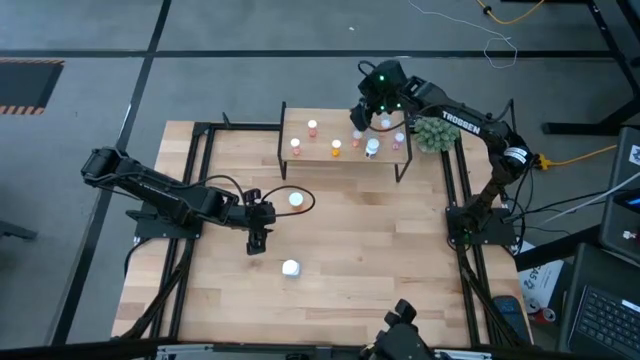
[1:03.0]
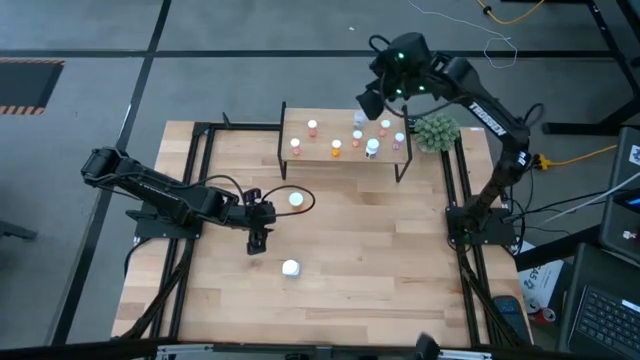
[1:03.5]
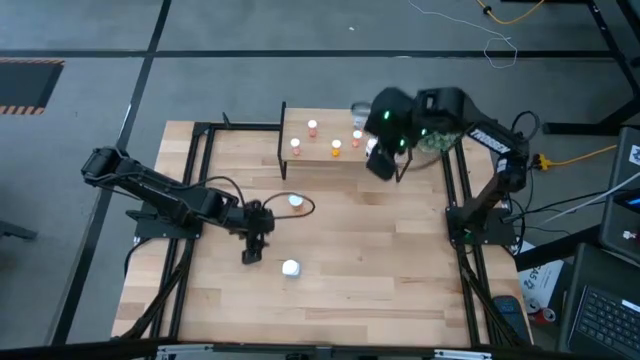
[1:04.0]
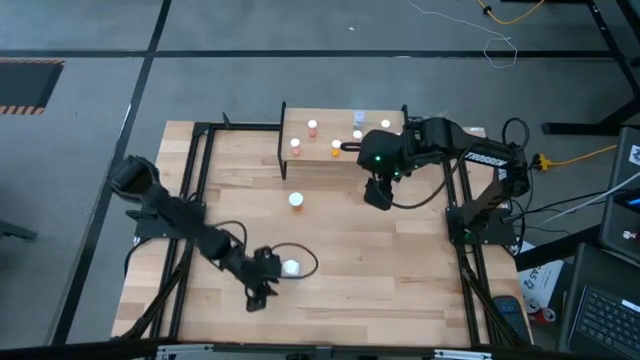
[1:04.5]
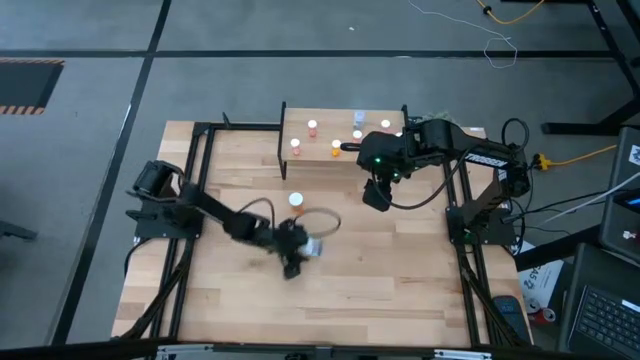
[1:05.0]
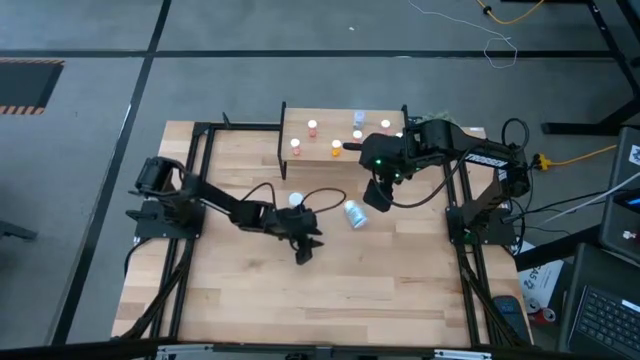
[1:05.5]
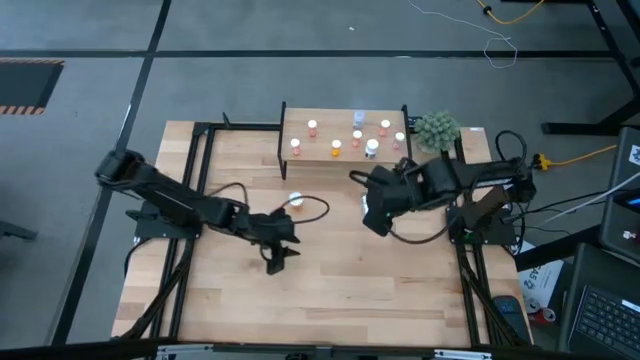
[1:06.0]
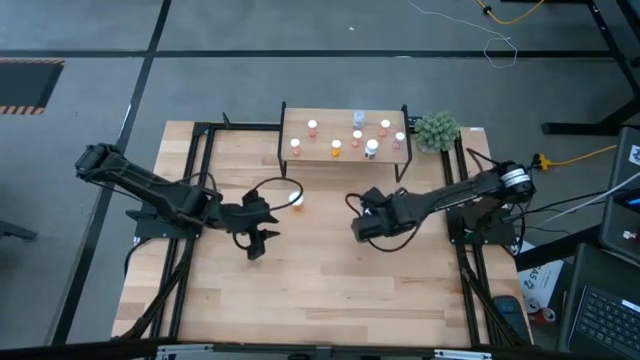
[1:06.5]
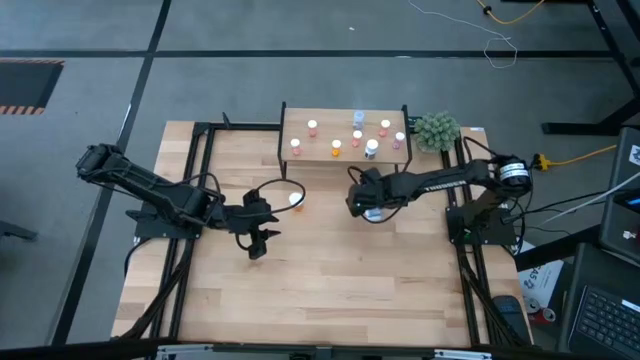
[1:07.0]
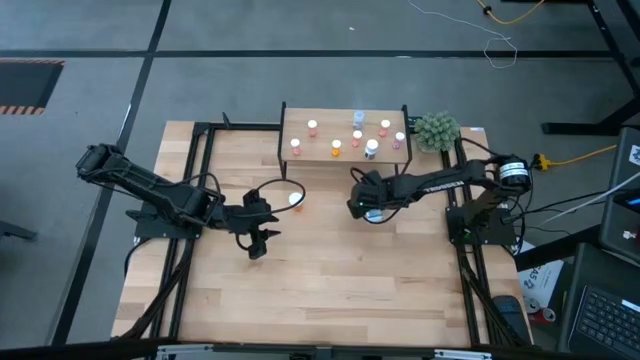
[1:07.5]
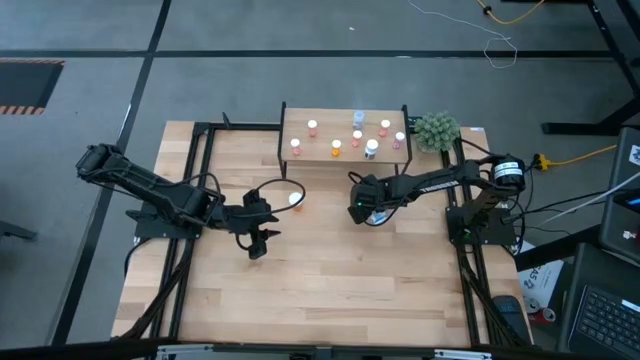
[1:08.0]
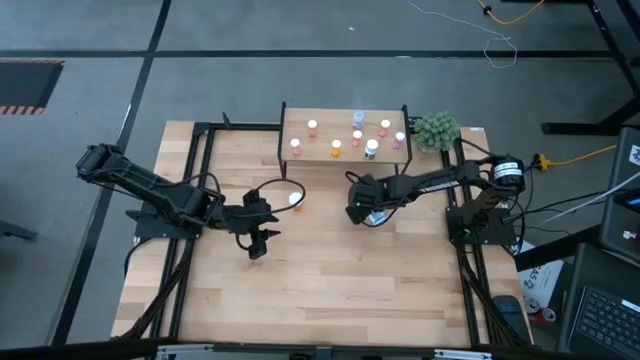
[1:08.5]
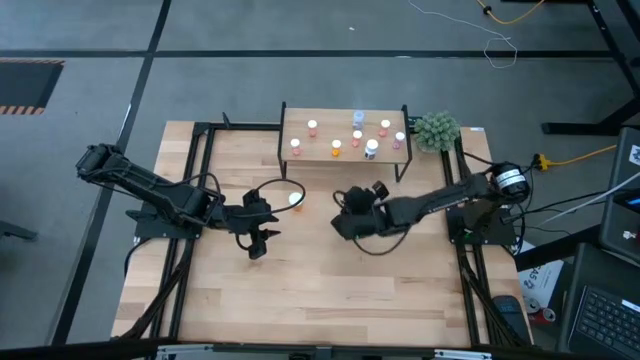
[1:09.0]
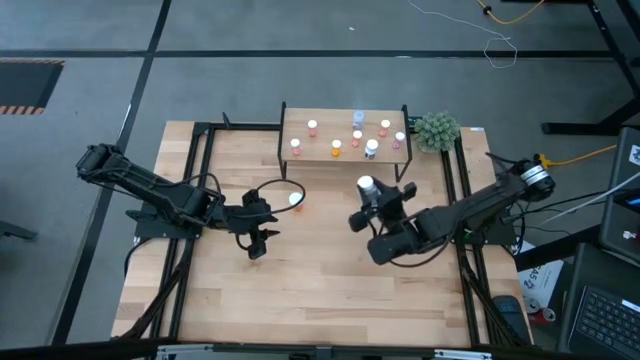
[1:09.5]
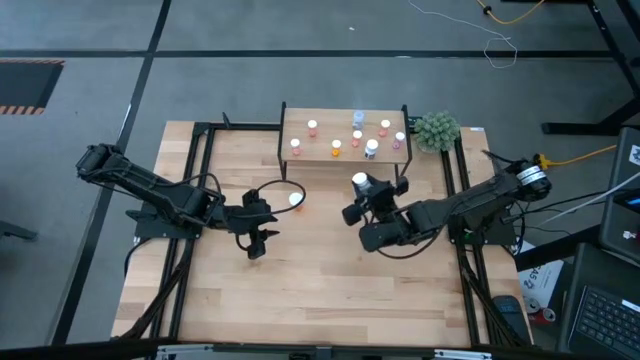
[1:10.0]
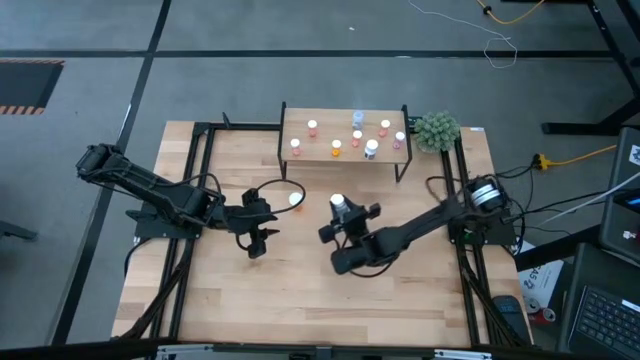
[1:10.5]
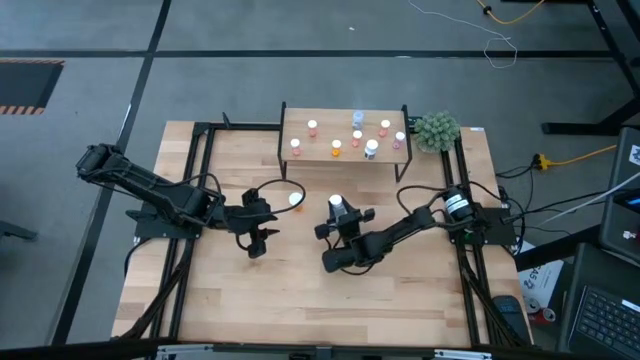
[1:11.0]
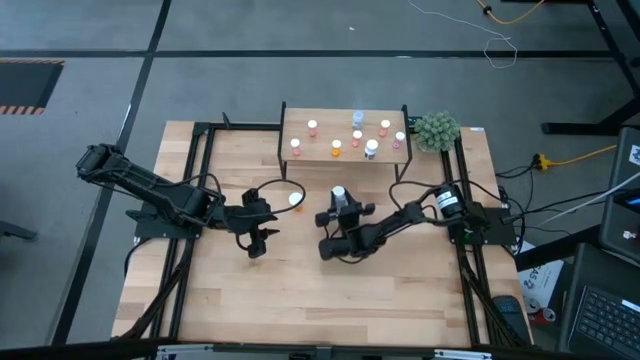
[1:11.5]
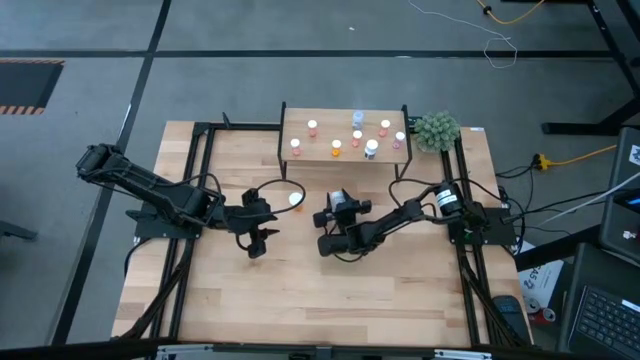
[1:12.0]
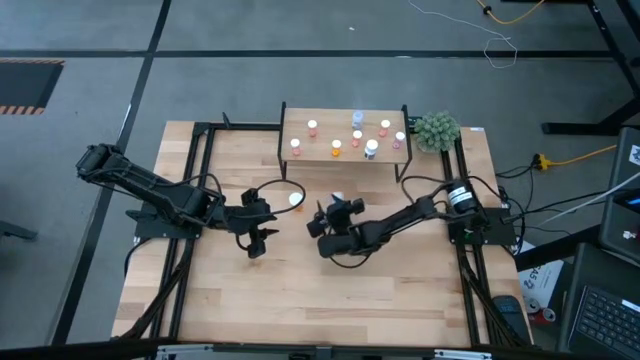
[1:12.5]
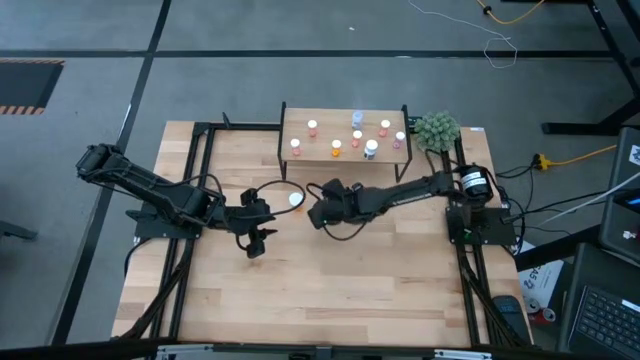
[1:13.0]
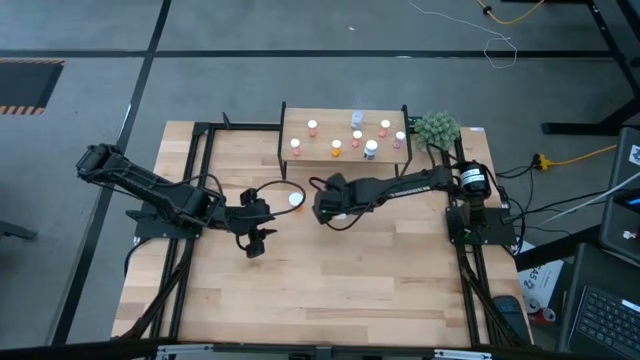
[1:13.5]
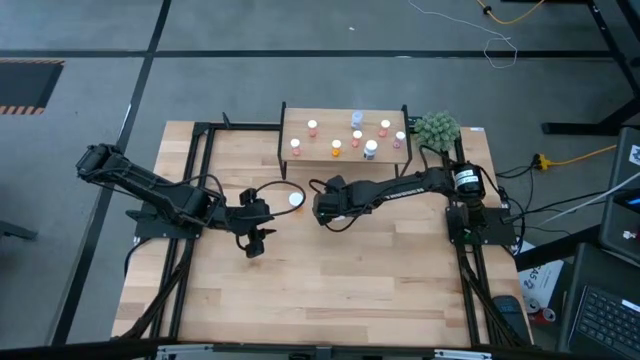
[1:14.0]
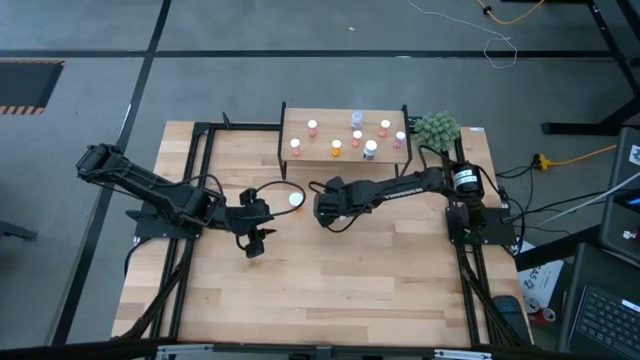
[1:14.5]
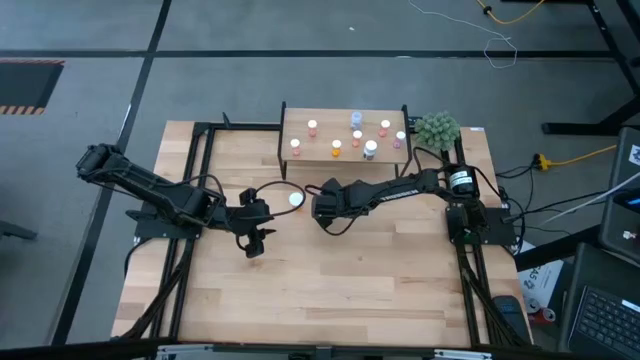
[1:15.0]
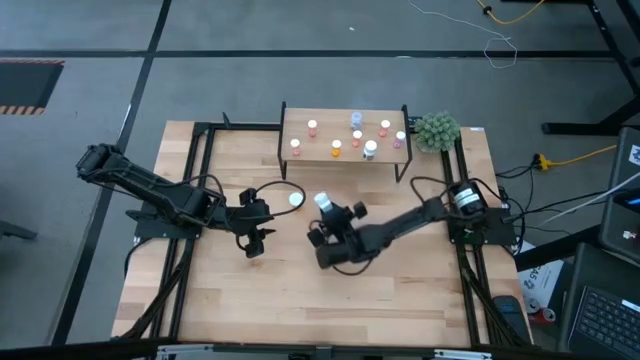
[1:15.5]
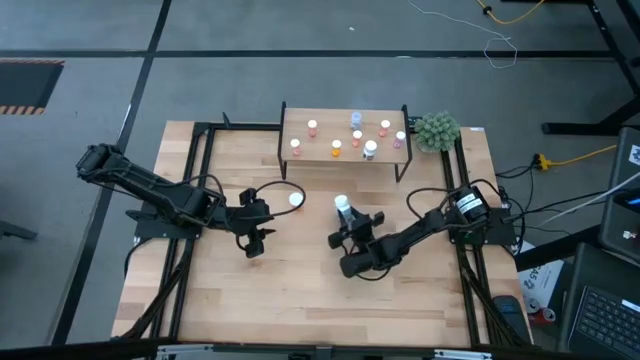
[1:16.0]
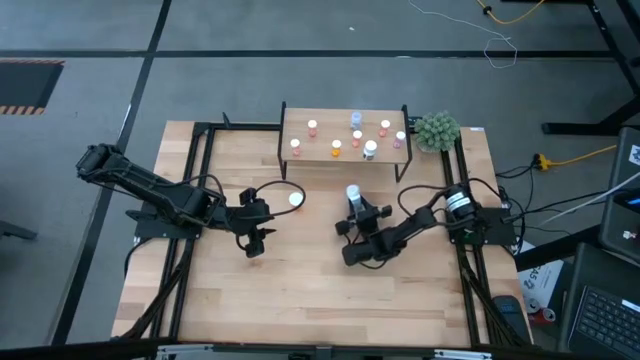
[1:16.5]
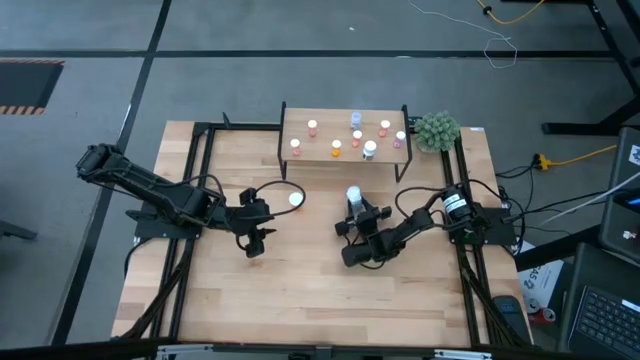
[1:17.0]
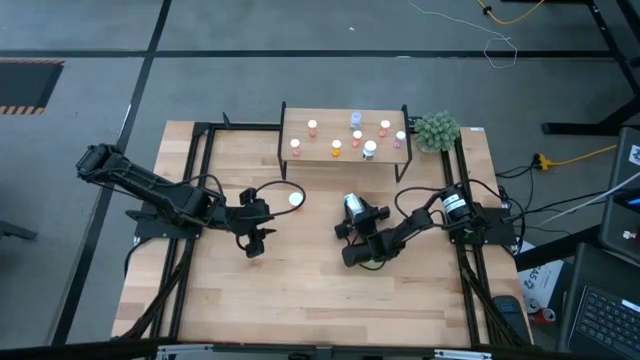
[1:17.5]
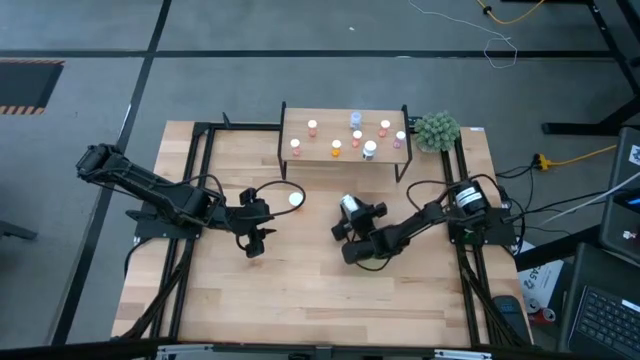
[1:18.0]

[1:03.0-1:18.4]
Task: Pick and place medicine bottles onto shelf by color
Move the big white pill bottle from the bottom to the center of the table

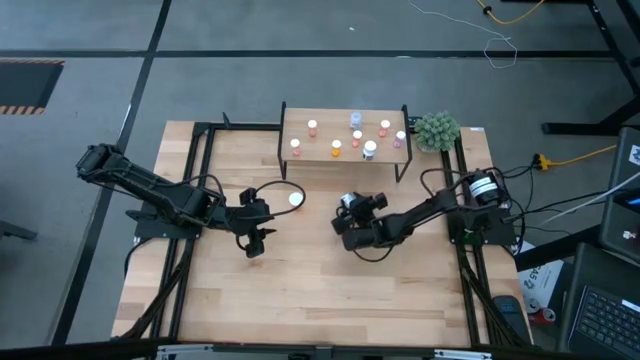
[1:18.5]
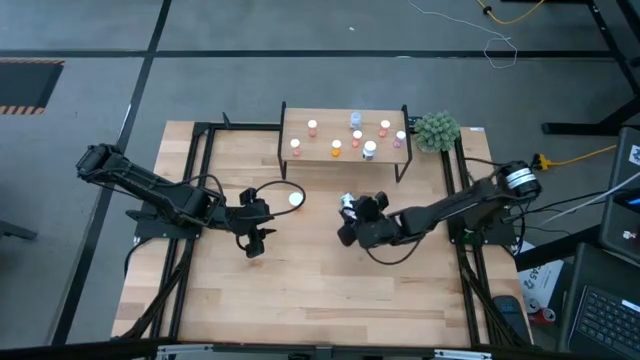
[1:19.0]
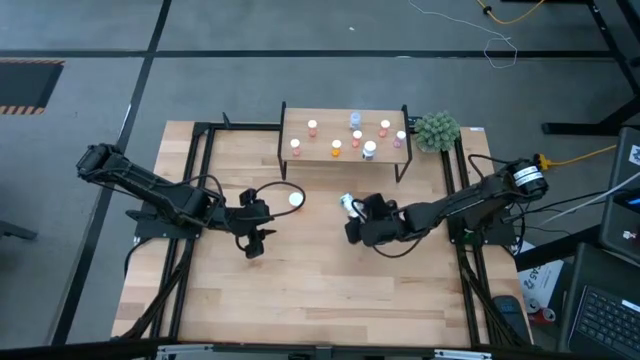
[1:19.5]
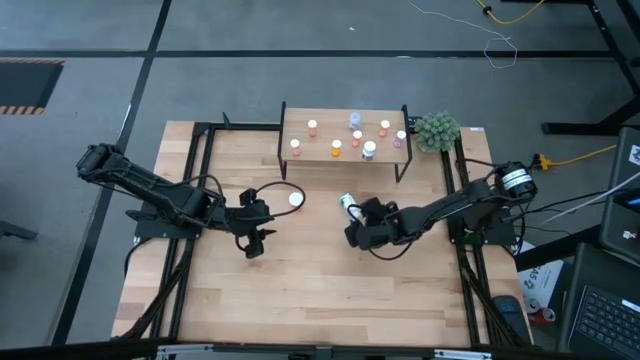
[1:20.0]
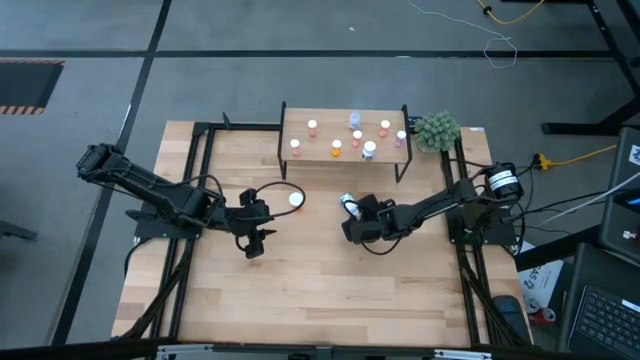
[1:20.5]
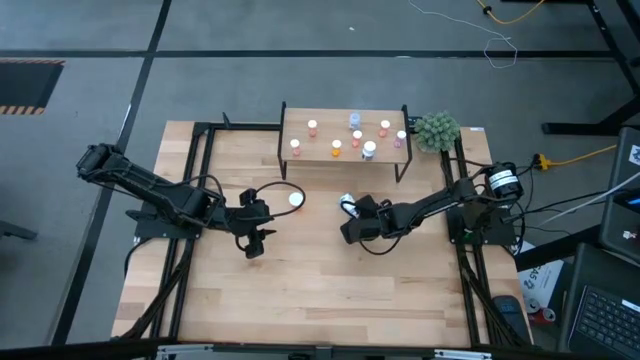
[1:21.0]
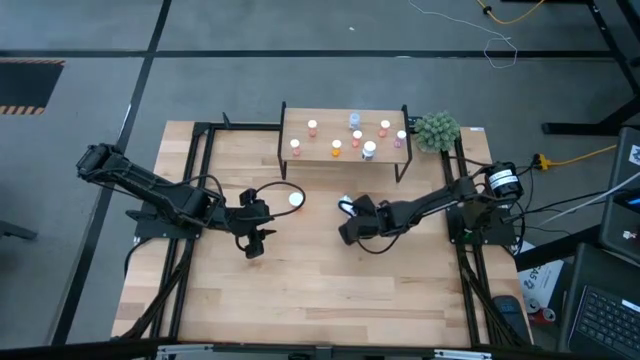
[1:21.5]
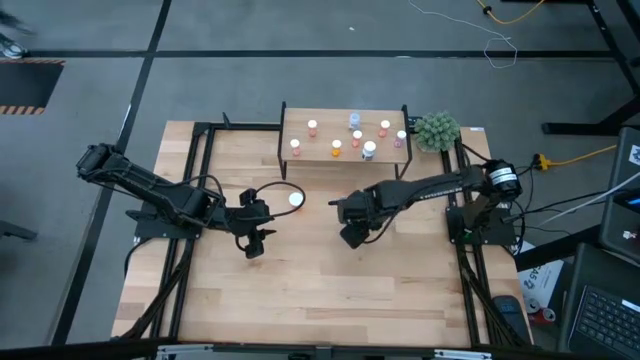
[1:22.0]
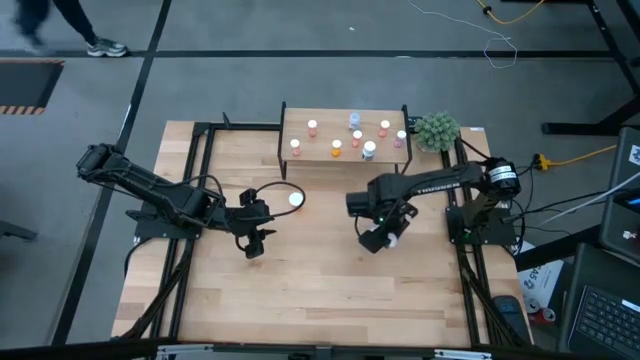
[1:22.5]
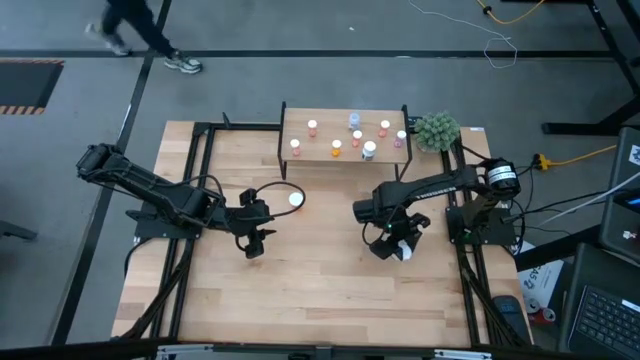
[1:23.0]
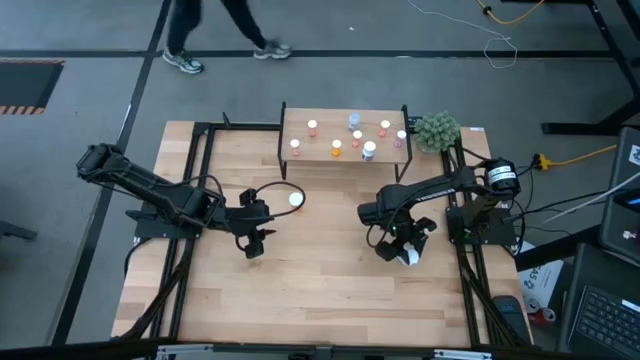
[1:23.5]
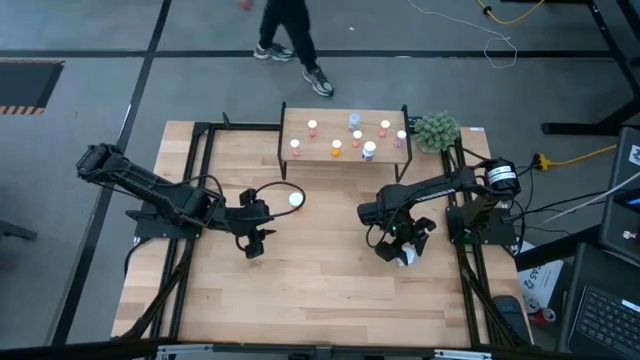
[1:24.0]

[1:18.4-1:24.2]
Adjust the big white pill bottle
